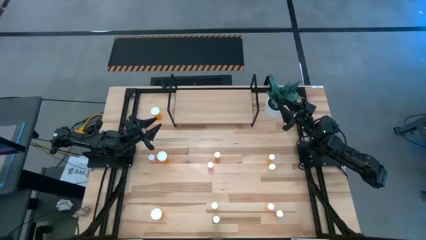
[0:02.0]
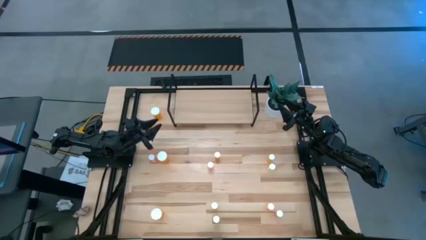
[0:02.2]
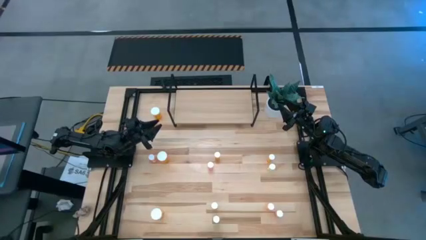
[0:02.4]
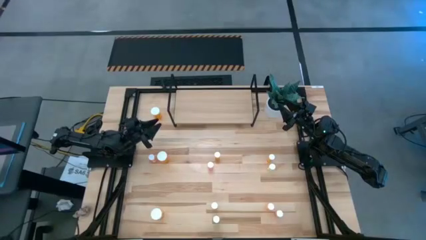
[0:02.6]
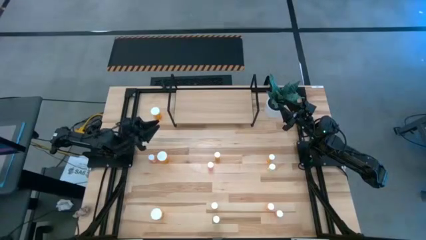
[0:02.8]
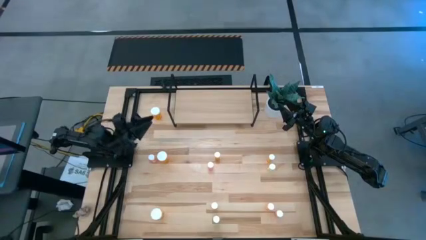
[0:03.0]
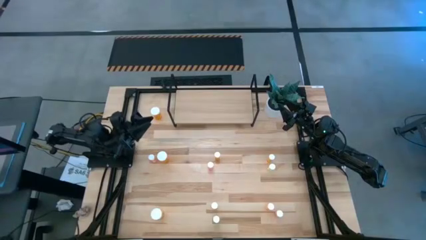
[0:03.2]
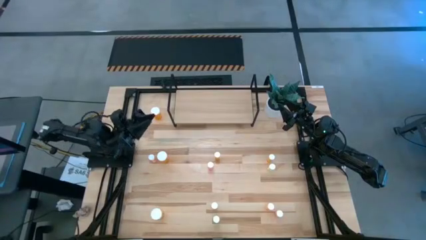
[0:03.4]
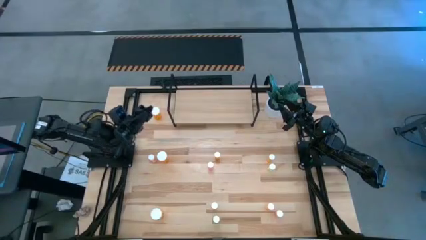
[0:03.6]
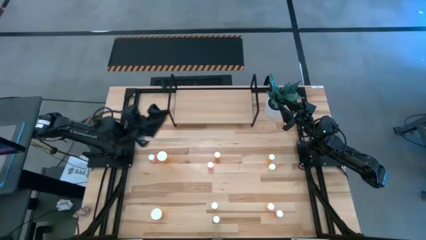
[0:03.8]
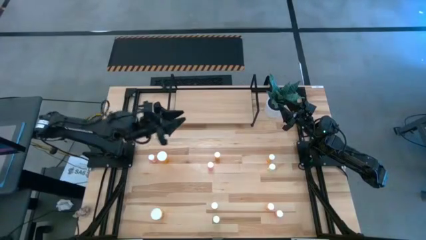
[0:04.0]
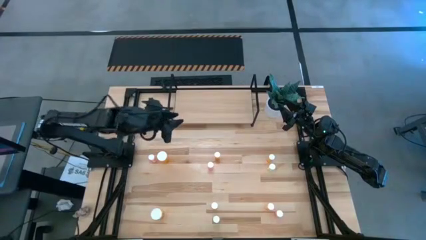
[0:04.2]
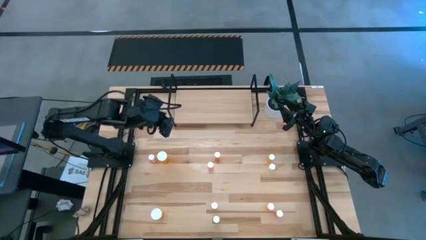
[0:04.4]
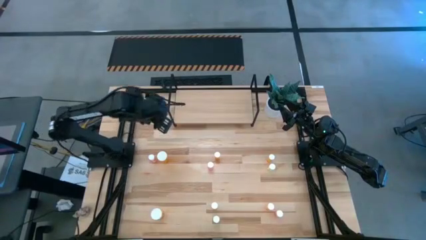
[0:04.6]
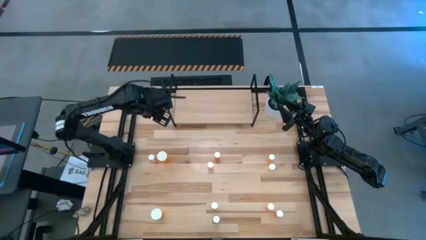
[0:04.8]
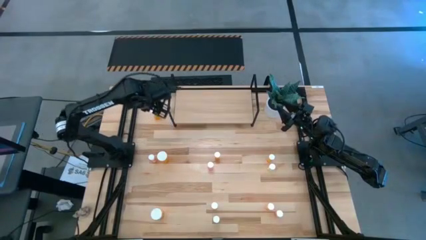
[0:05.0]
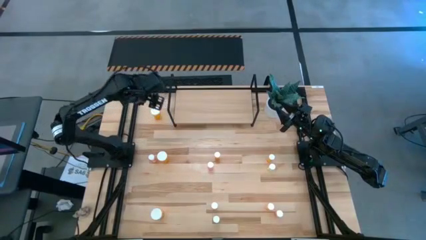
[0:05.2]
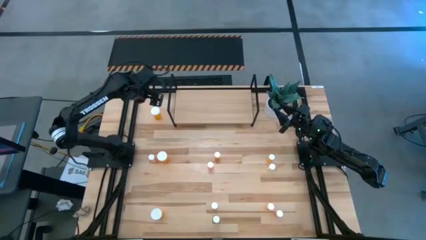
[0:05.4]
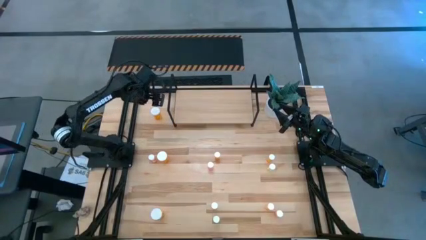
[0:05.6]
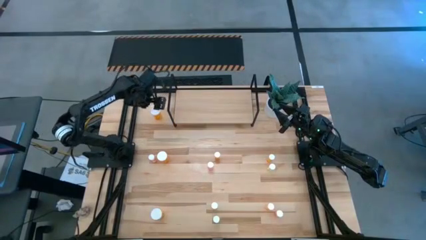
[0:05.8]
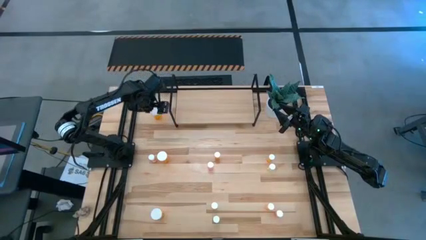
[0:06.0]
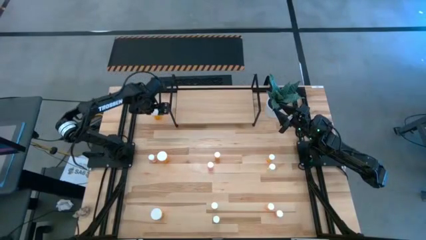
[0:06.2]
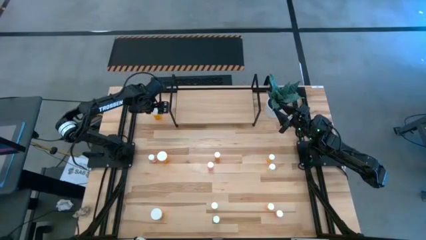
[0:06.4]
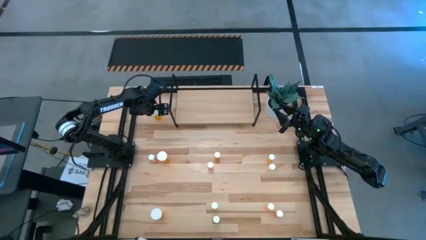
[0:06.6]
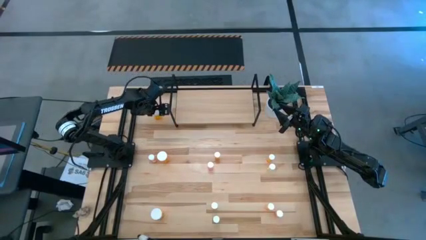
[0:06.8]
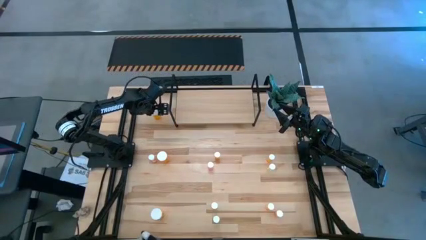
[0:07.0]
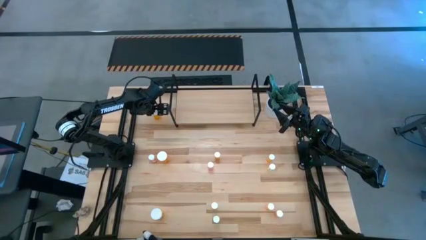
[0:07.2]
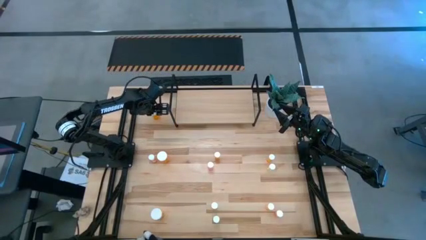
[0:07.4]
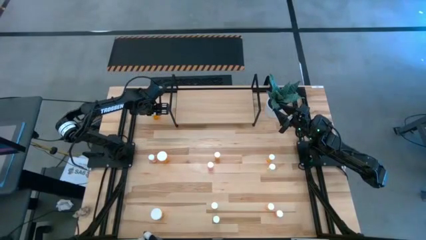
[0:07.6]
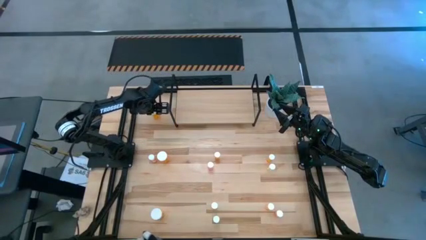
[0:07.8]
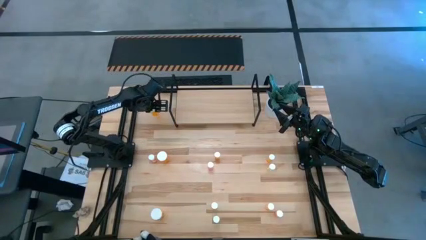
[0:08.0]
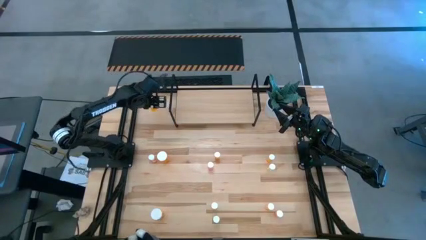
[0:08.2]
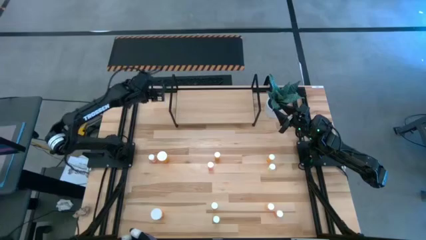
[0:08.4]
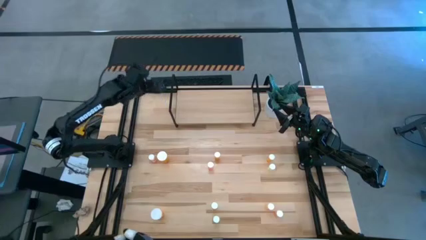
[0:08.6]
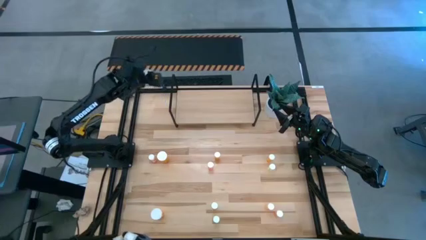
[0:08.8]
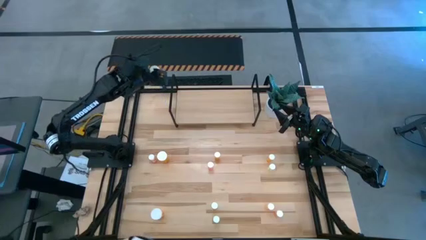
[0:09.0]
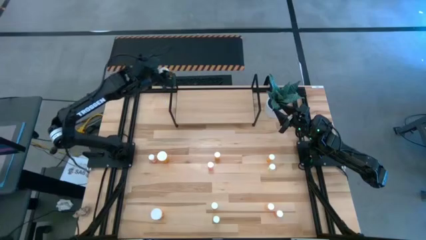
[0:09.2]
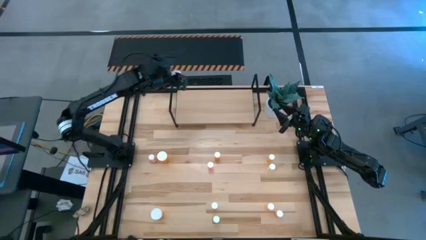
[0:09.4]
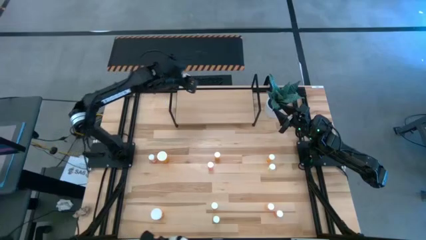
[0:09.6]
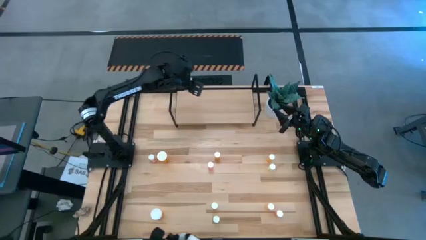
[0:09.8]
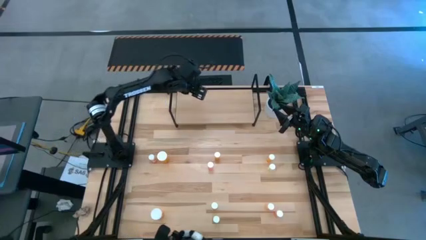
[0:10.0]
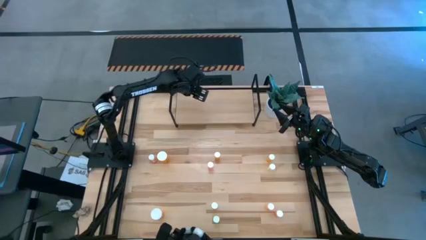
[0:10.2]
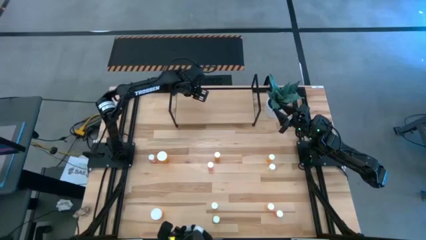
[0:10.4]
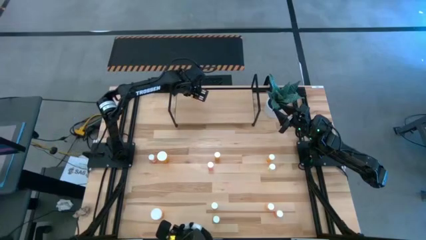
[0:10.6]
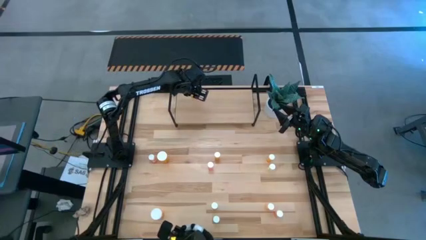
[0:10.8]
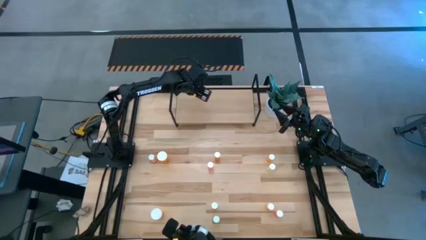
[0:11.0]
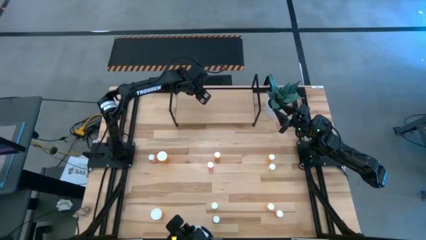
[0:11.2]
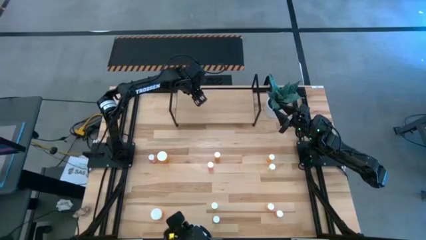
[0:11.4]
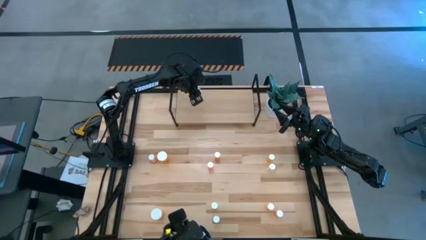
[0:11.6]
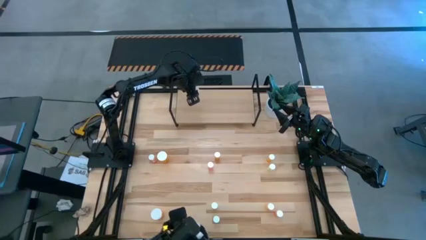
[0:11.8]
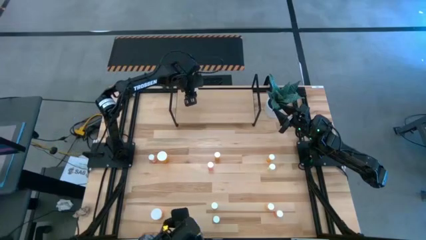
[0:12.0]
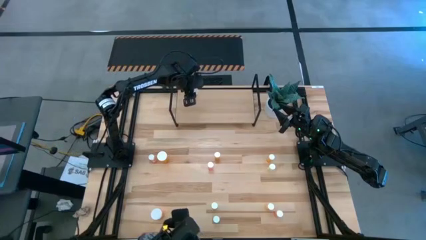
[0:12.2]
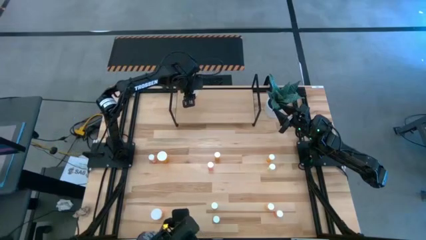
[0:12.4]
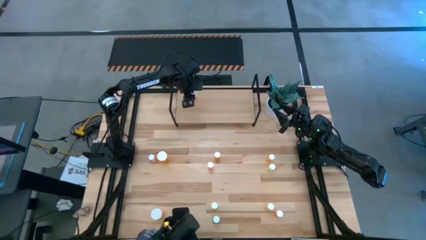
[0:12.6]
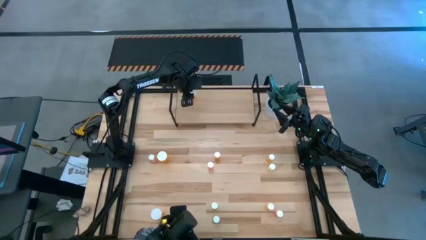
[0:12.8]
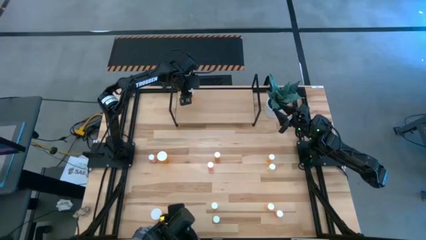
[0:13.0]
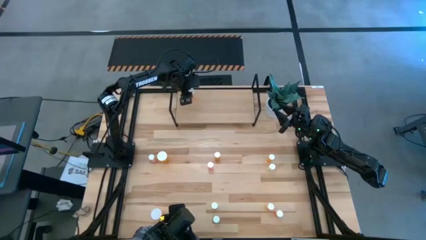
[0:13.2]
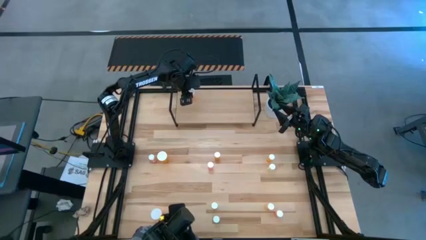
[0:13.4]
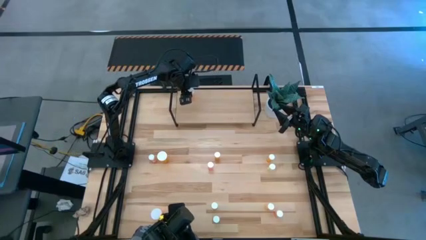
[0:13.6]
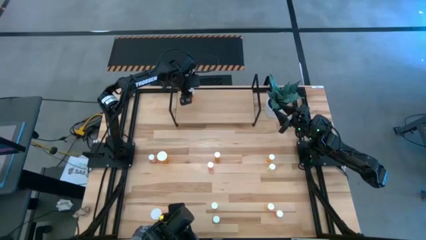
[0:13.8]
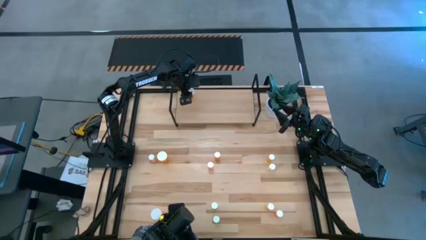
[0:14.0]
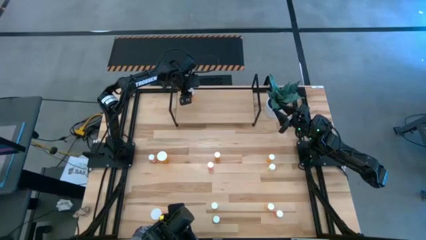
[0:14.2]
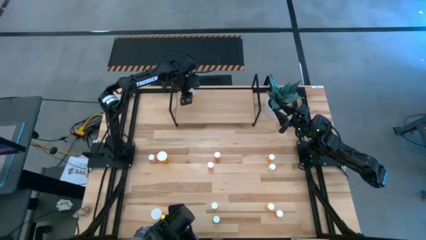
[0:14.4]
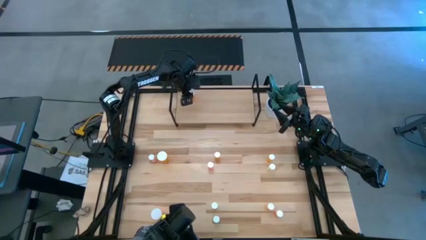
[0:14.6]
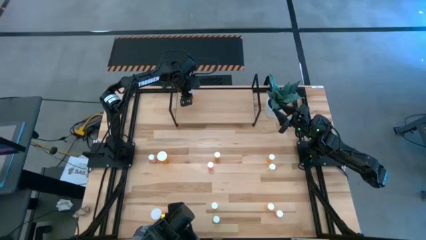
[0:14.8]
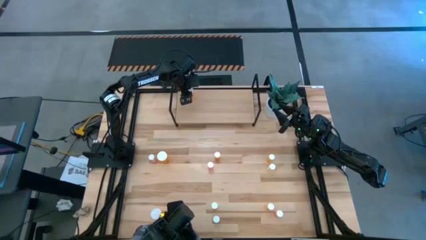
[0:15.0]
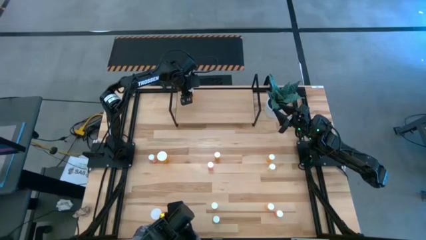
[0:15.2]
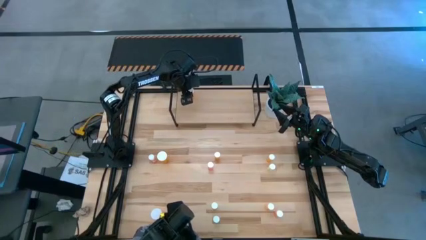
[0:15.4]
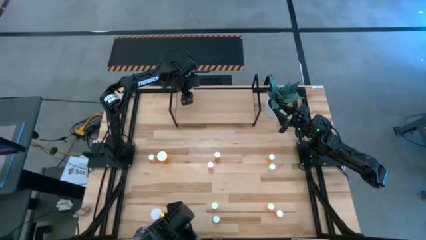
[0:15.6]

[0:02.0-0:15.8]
Task: Pick and place medicine bottles onto shelf by color
Put the top big orange pill bottle on the shelf
